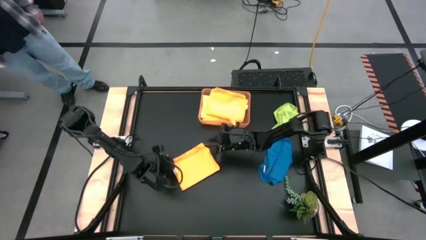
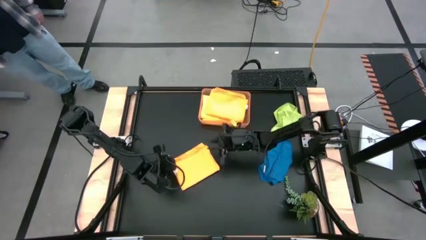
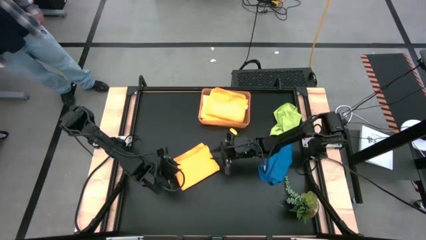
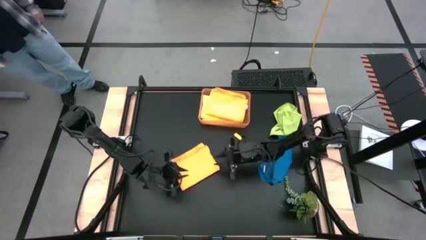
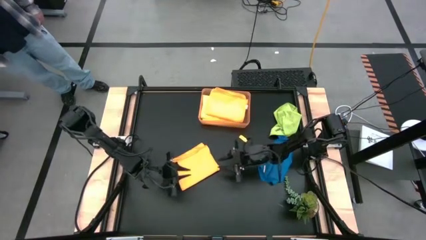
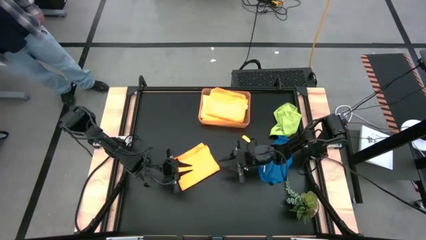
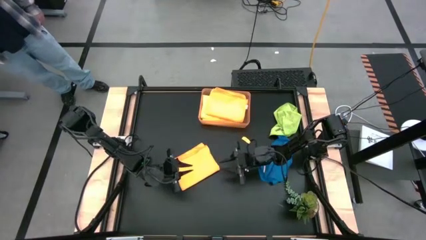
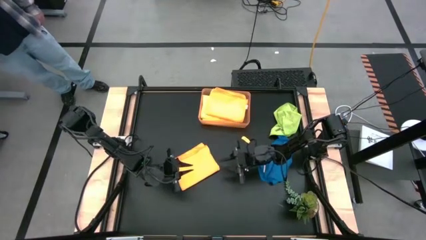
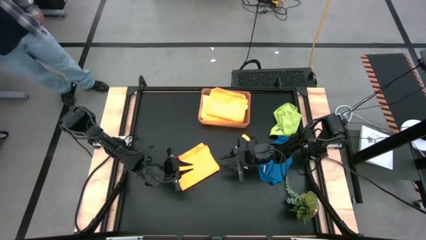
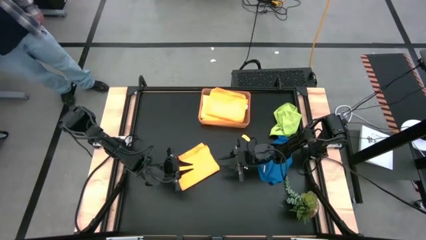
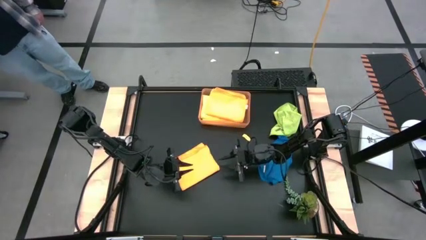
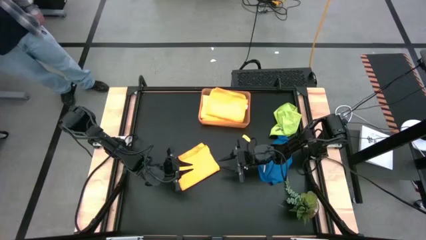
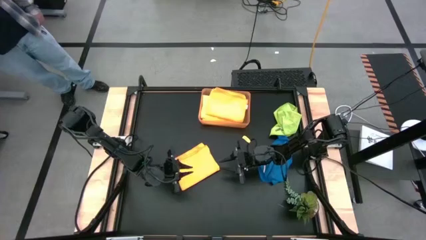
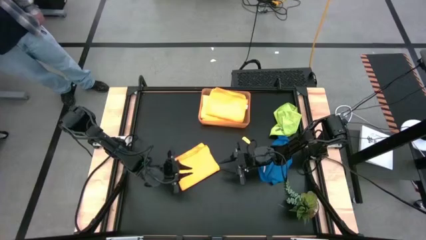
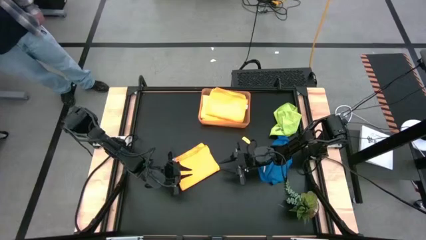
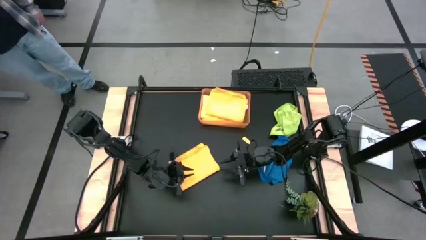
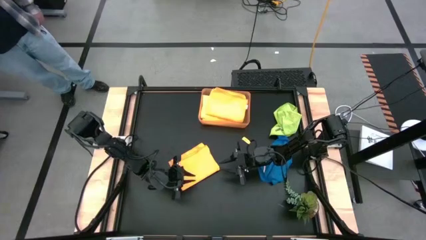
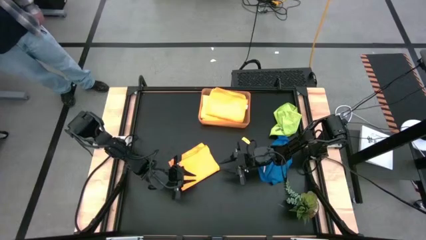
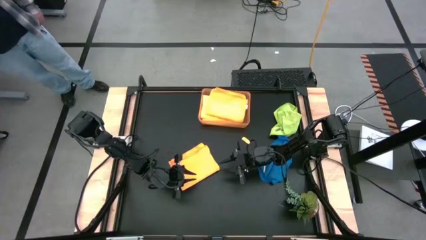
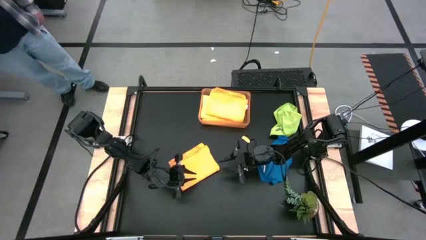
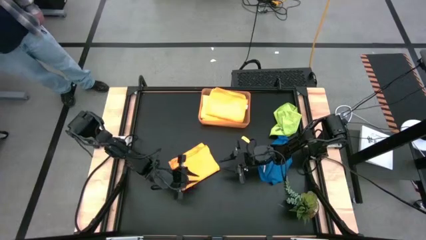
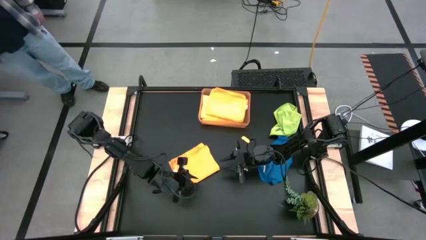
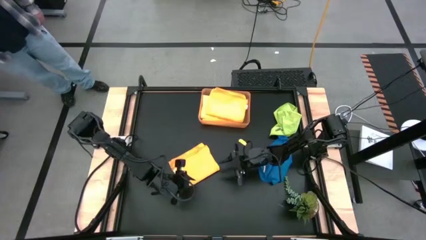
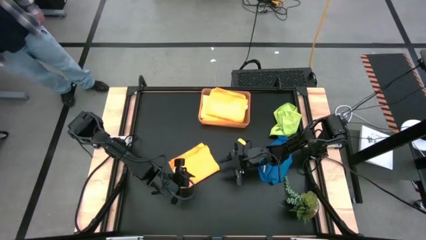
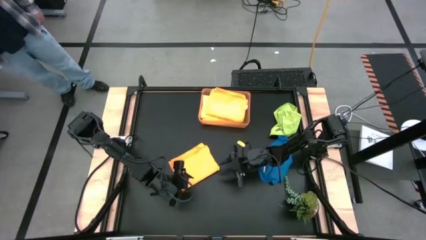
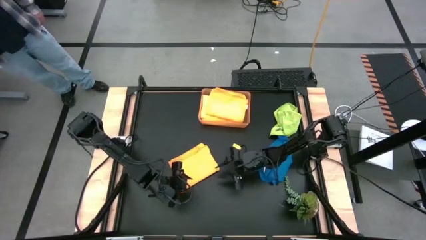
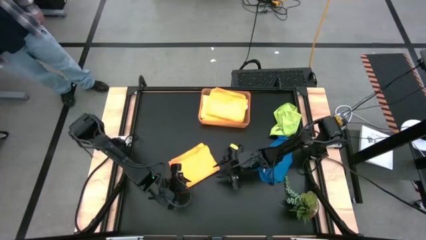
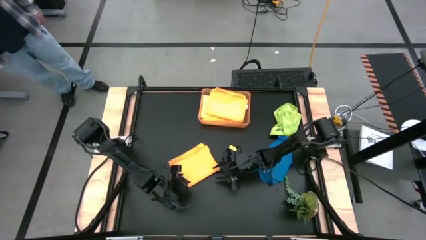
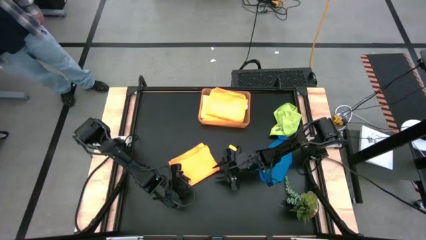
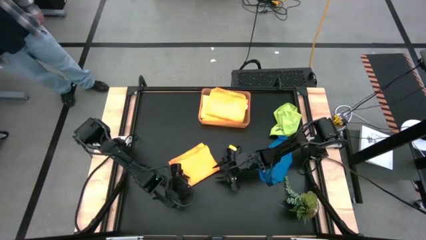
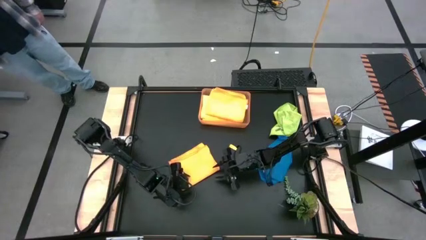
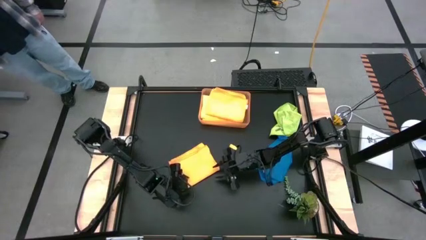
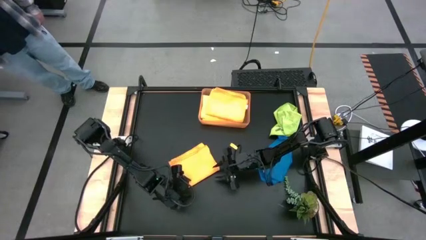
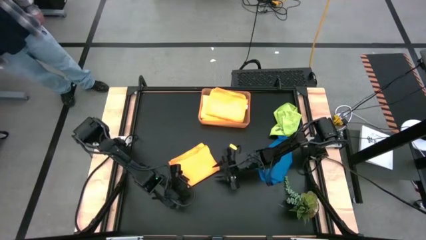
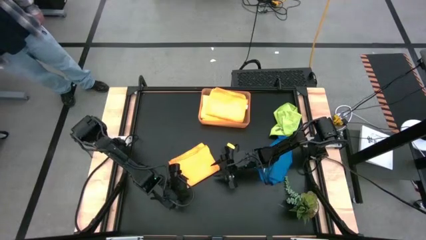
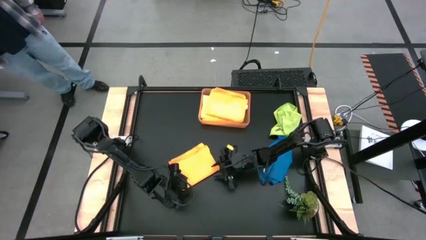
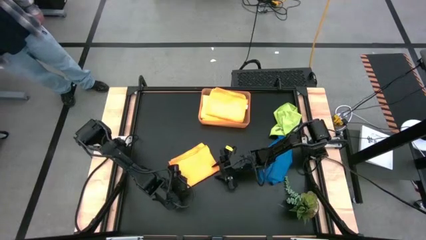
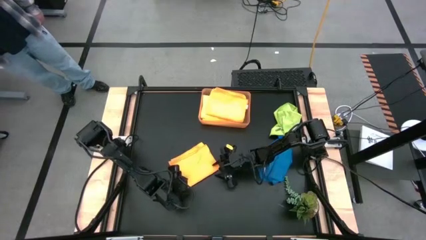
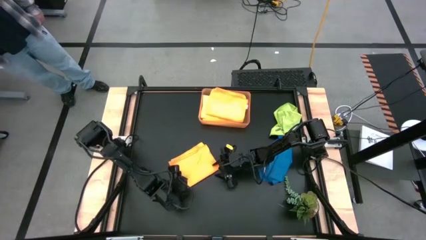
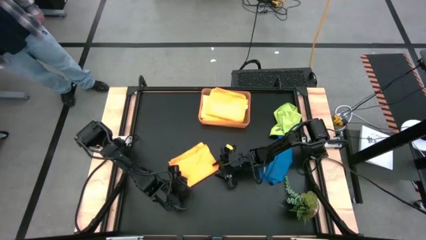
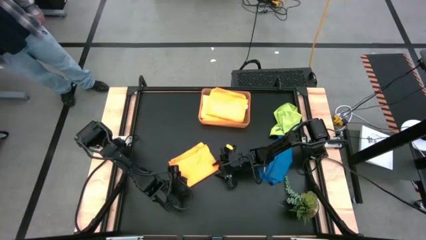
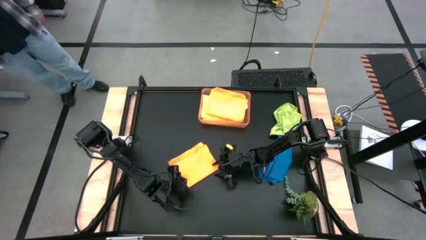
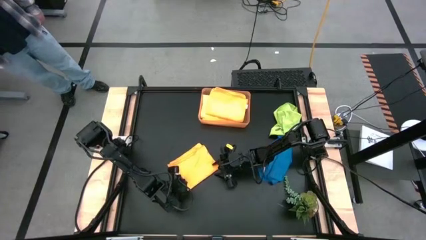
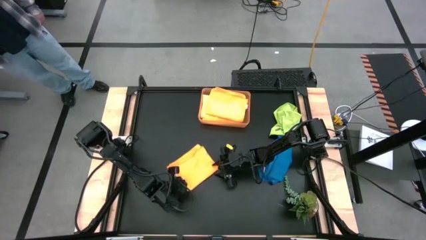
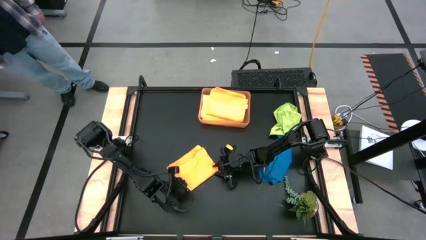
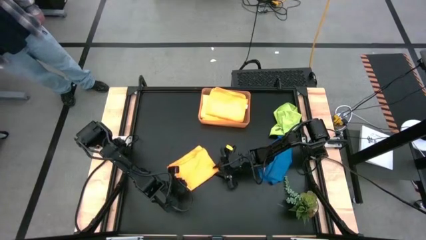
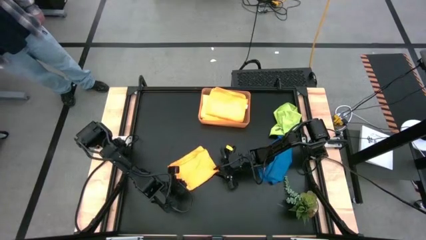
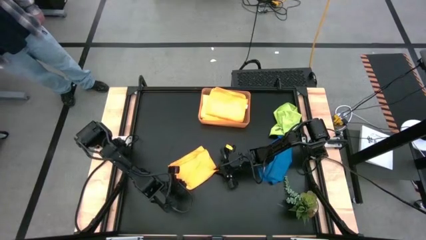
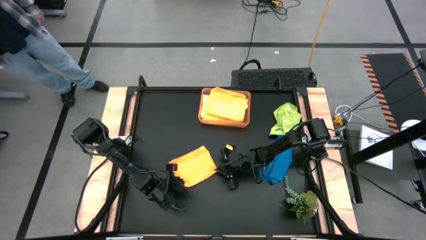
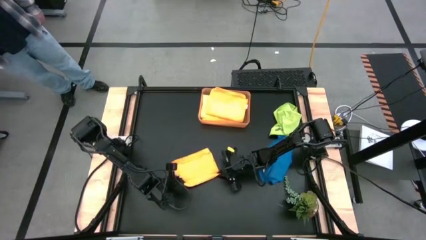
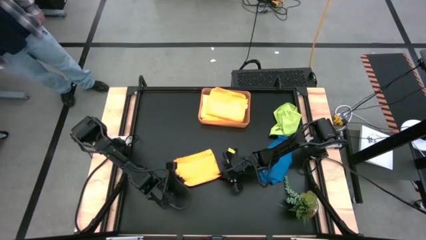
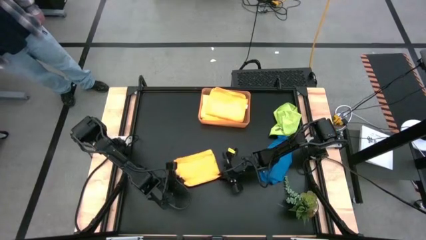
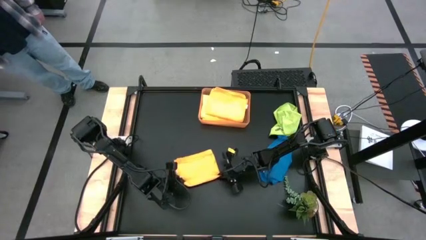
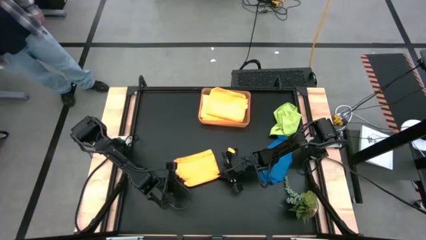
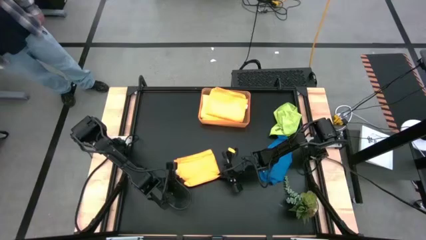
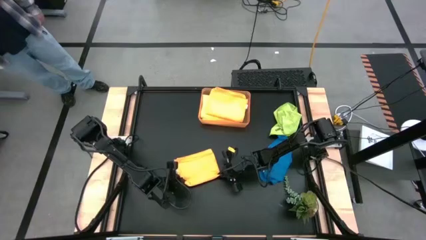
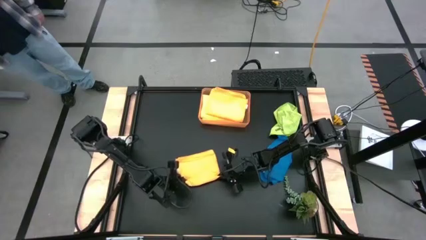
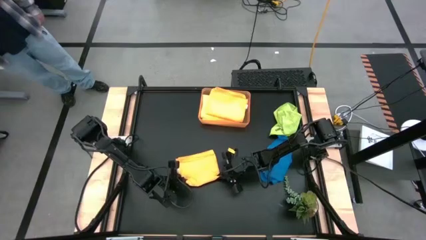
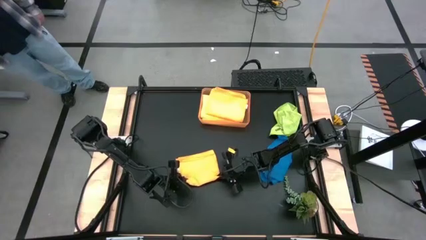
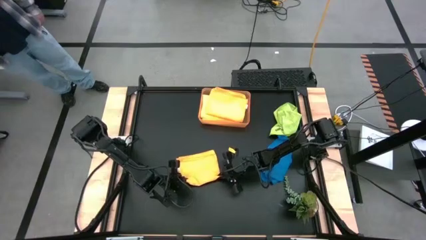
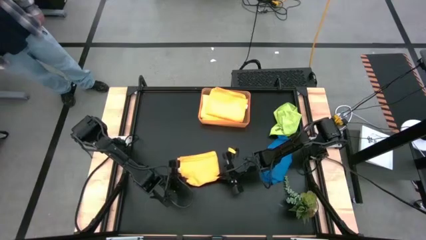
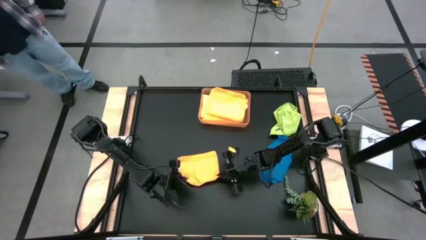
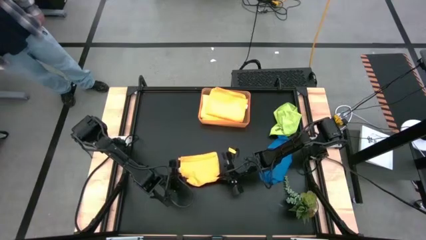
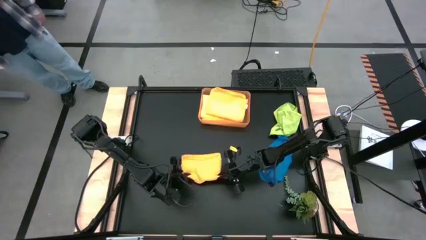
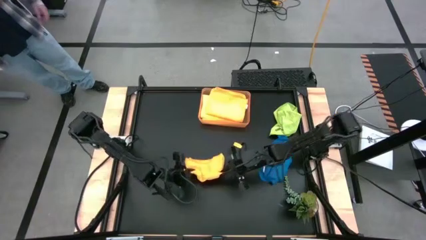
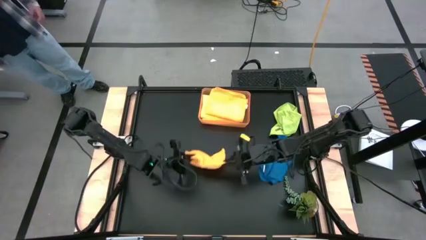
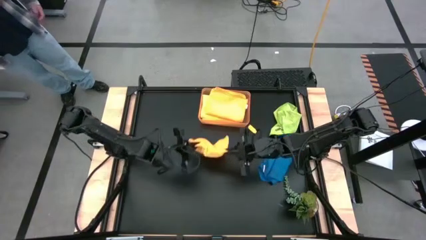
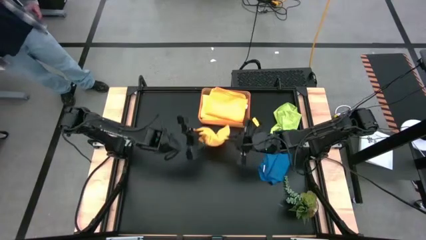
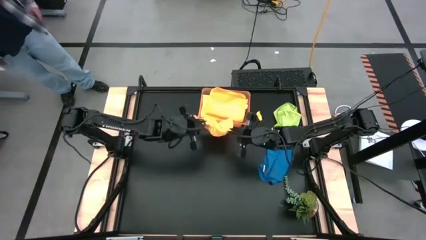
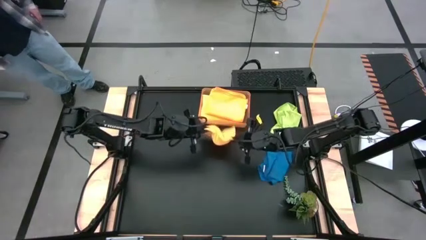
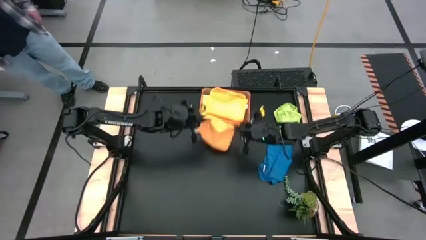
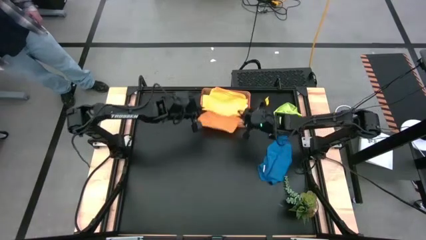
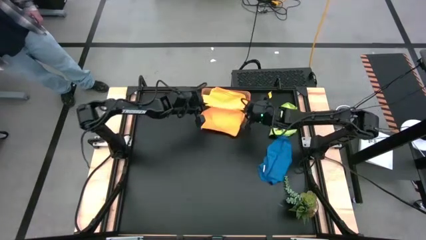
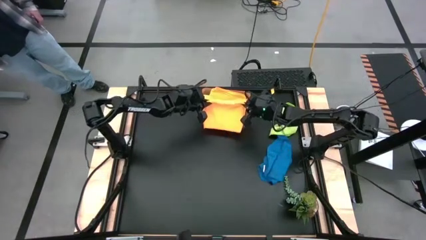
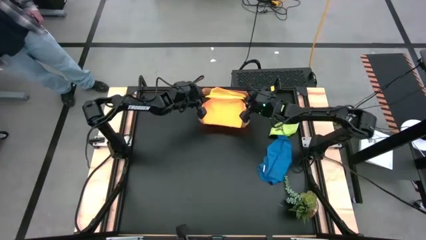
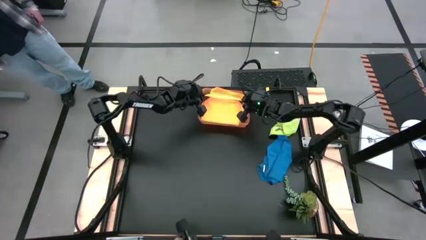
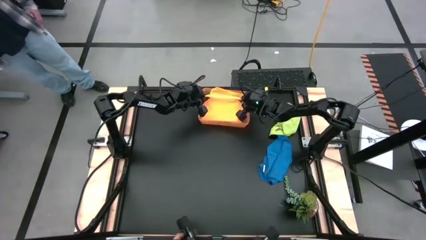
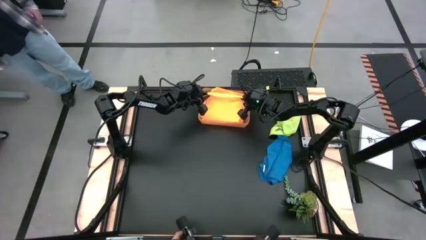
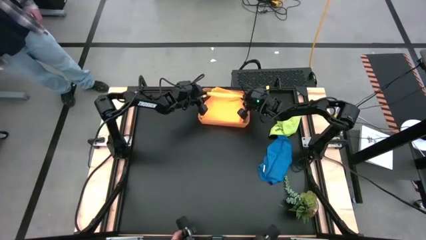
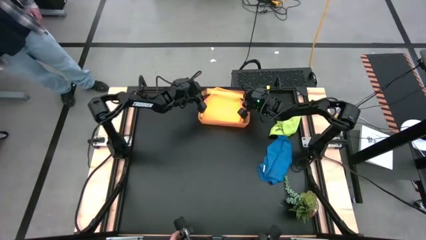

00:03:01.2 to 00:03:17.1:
Task: Fold microfiber towels
Put the orange towel in the orange bin
